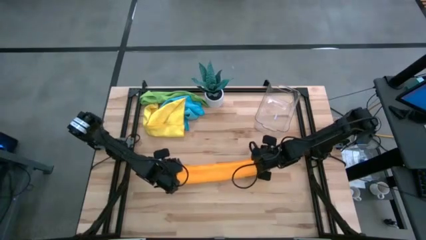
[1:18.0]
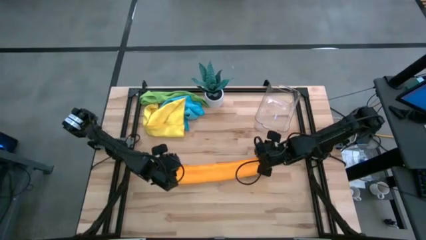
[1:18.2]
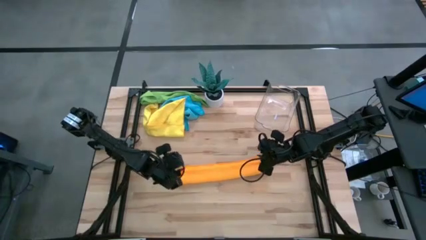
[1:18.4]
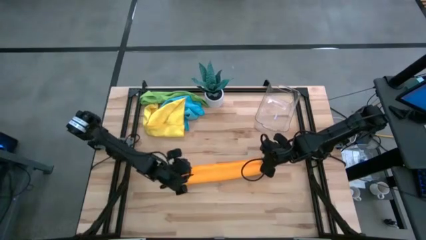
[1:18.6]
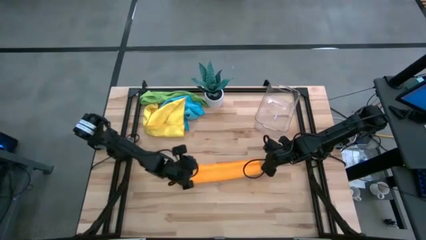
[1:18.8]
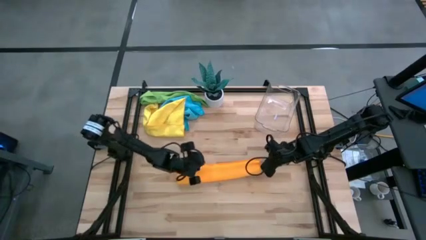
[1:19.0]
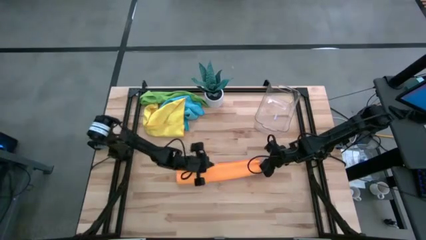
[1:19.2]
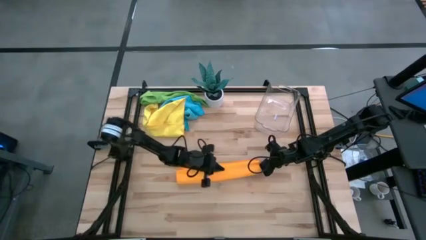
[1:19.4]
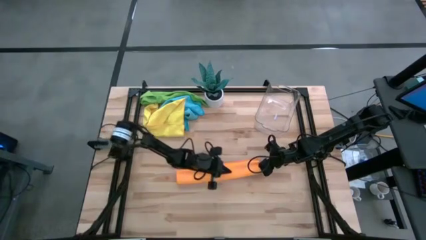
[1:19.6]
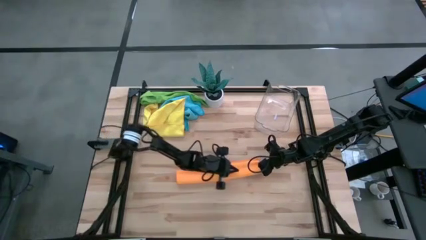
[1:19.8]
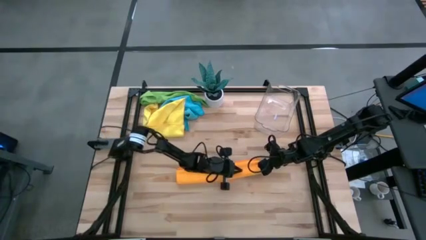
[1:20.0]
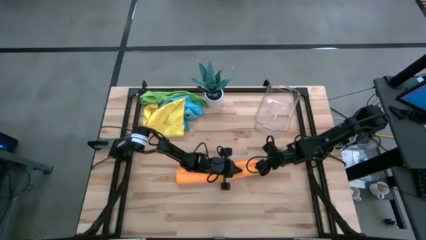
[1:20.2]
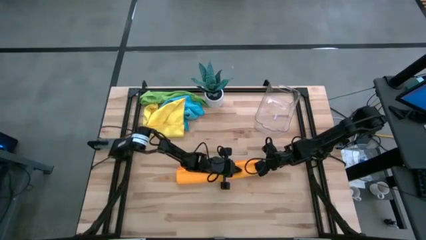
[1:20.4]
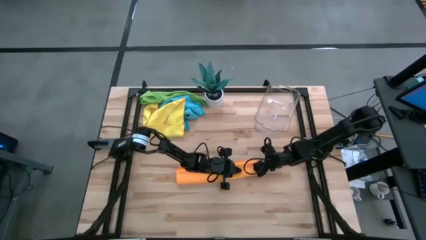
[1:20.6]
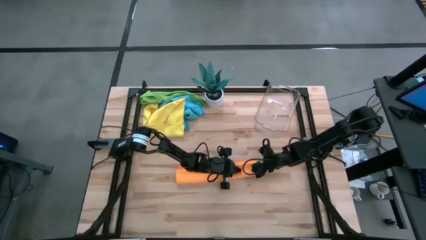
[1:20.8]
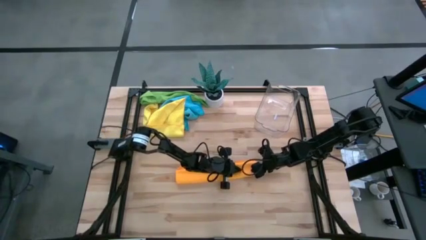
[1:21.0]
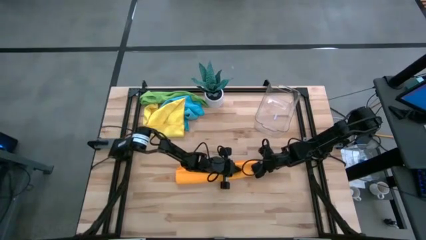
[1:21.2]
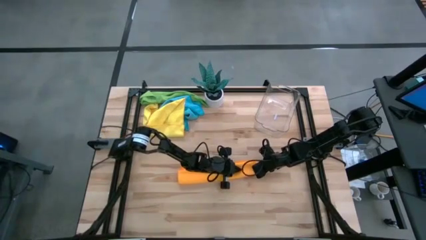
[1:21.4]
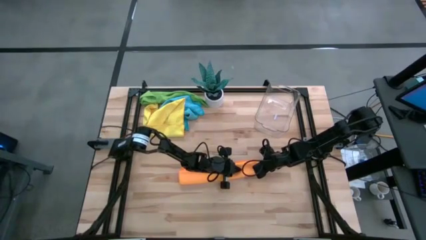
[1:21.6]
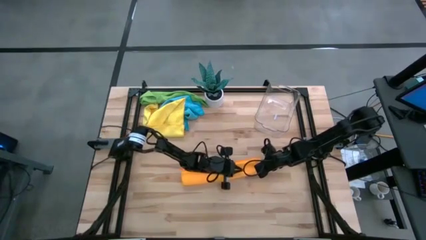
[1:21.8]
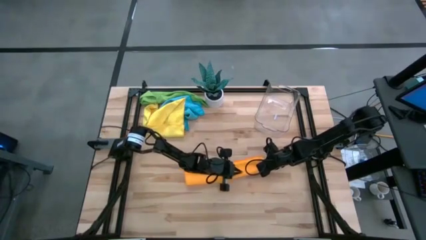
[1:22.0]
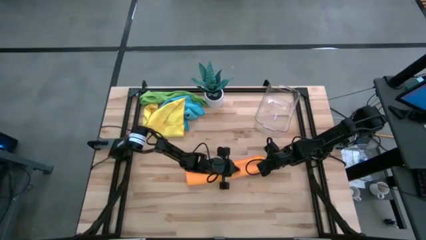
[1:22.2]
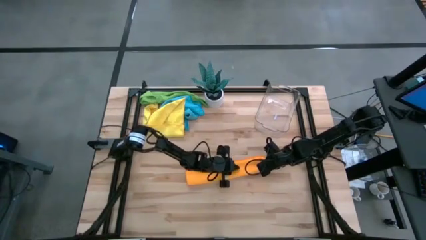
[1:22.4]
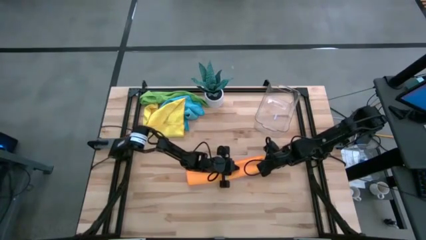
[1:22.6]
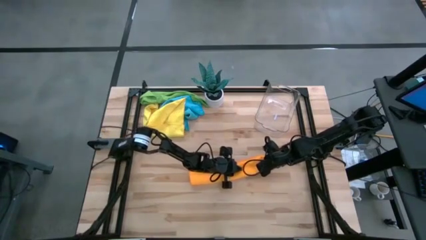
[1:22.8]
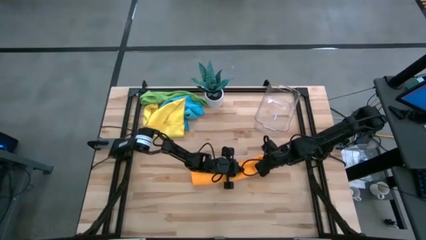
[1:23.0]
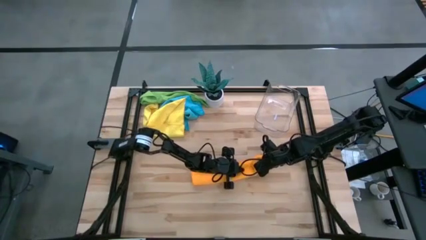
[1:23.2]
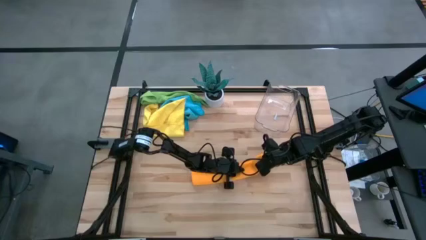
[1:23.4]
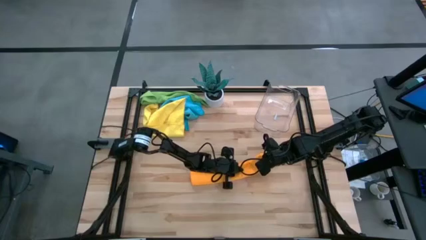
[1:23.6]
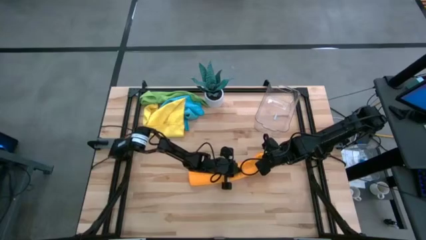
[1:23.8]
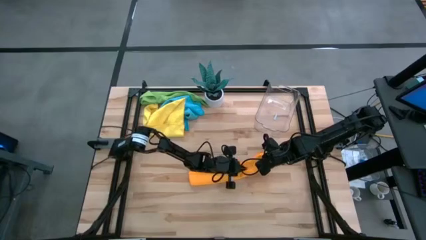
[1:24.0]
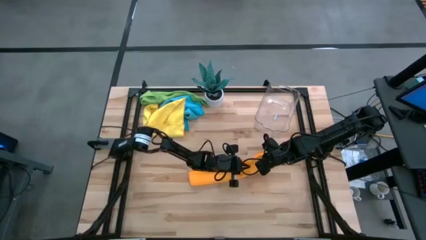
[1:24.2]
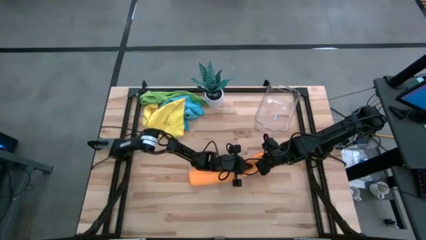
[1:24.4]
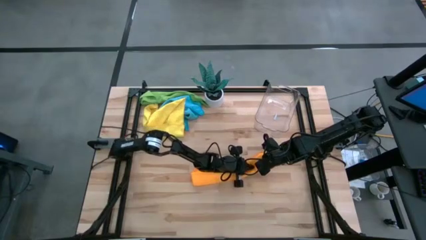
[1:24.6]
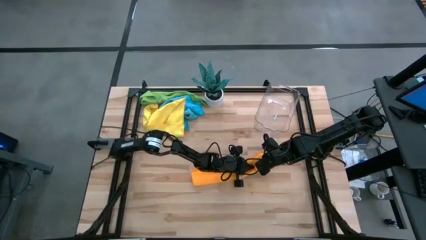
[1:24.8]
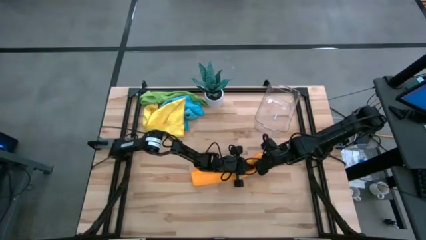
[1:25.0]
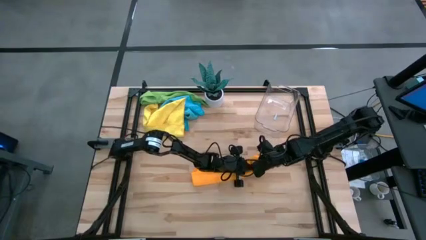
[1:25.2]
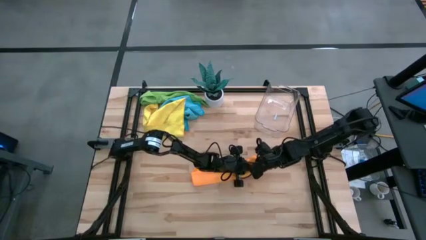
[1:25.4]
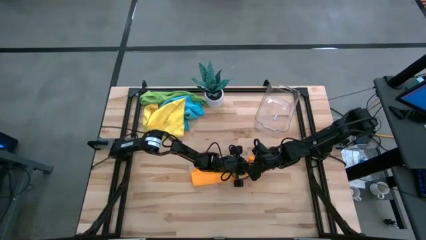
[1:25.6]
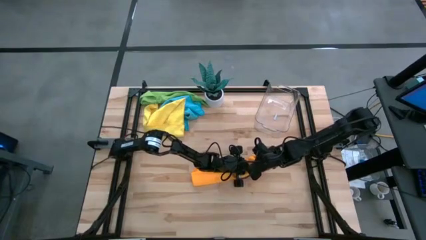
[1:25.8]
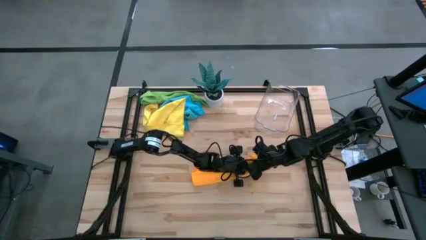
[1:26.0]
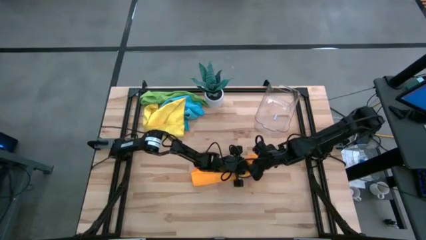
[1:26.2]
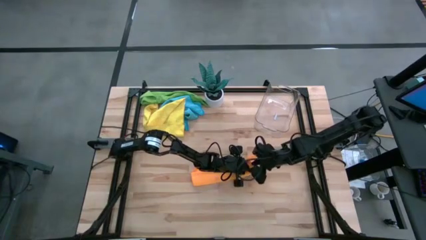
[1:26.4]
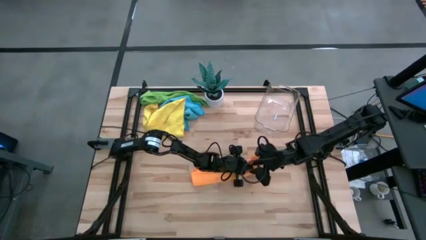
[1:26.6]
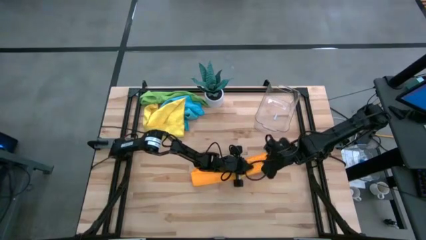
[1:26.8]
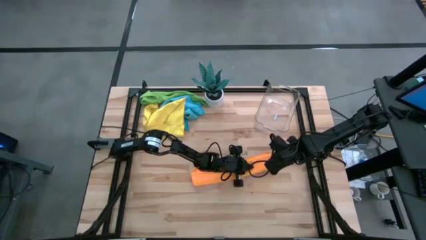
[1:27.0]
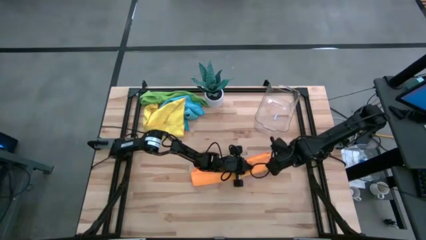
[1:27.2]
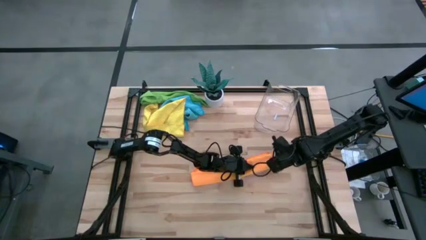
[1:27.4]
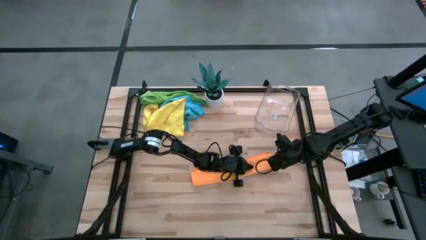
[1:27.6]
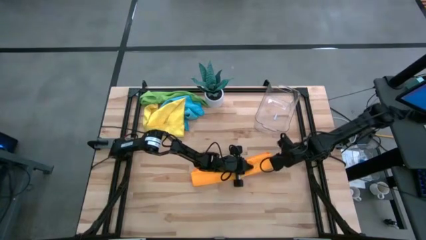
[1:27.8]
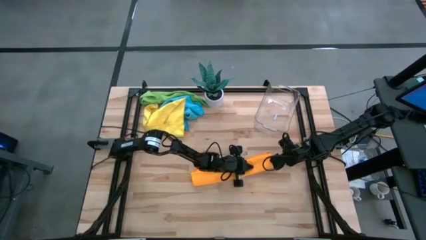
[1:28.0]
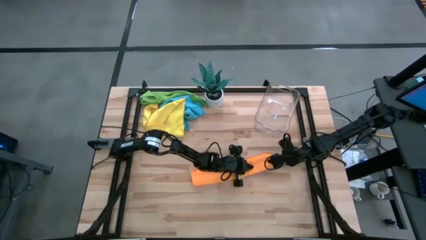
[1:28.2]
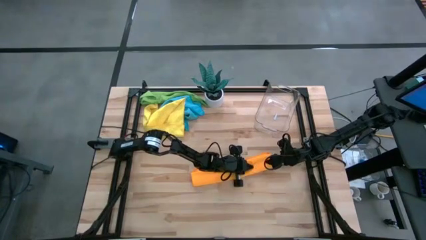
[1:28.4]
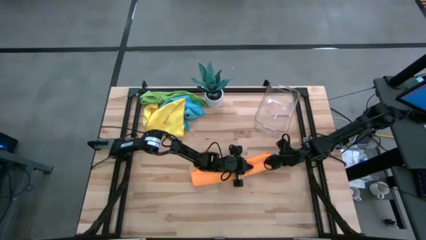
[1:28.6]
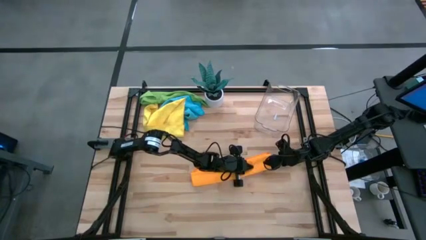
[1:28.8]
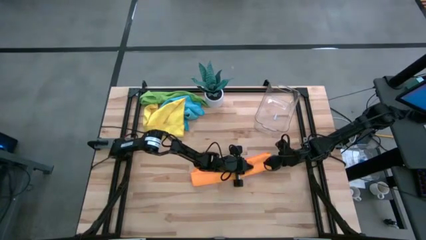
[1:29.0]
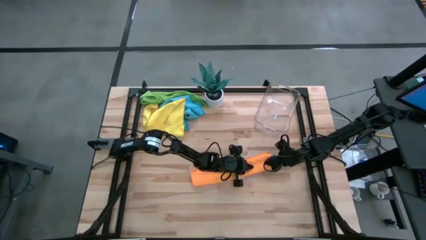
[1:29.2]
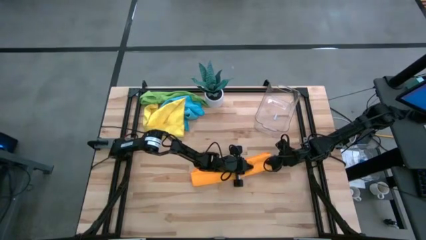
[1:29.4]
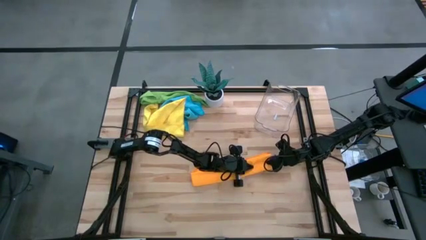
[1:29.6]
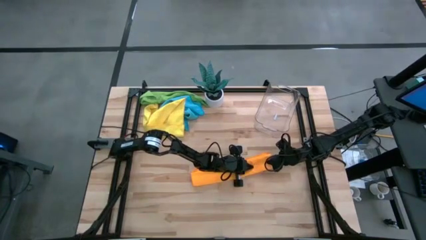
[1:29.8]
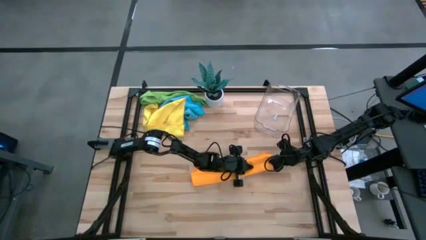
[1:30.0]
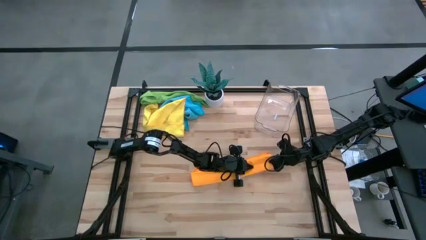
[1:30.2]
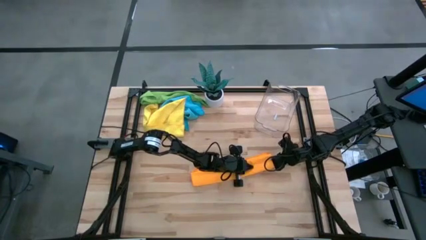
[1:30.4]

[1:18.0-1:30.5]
Task: Roll microfiber towels into tight, uniform cylinder then place into a basket
Roll the orange microfiber cloth

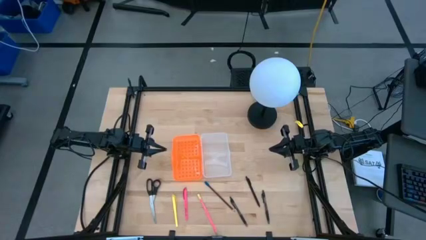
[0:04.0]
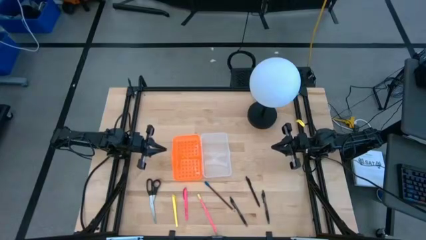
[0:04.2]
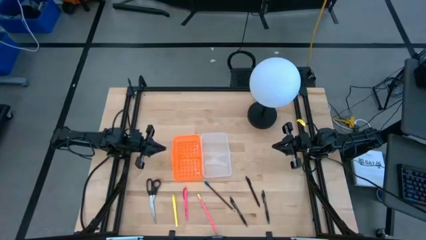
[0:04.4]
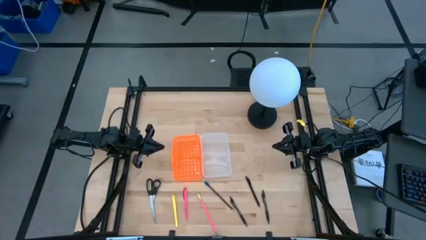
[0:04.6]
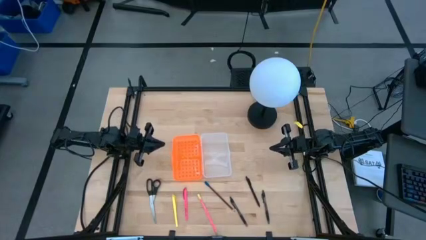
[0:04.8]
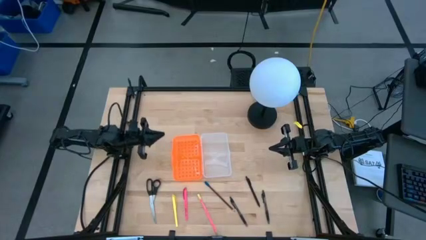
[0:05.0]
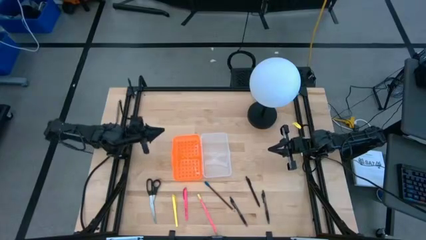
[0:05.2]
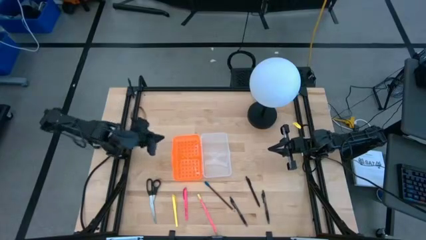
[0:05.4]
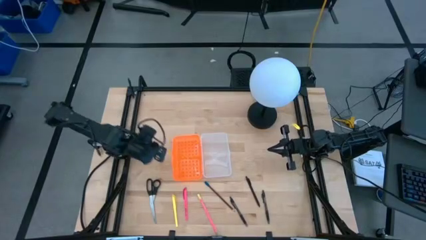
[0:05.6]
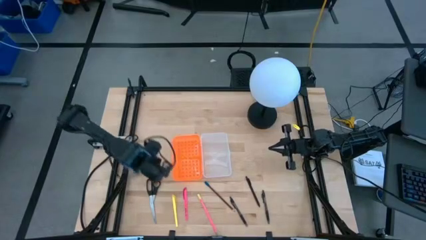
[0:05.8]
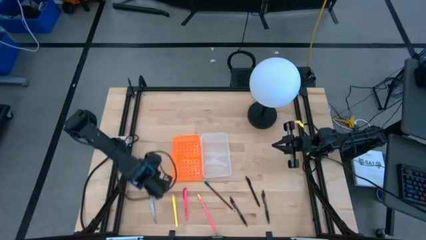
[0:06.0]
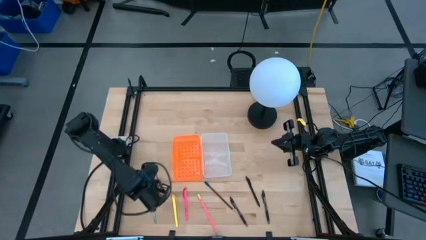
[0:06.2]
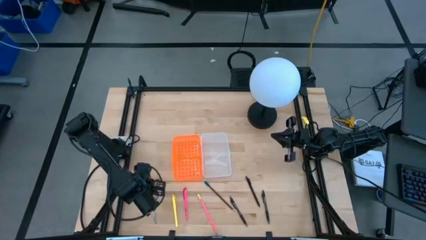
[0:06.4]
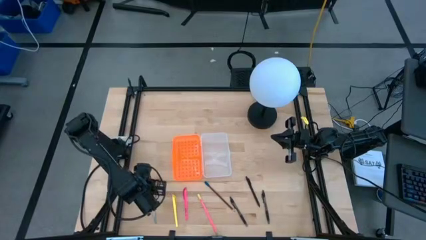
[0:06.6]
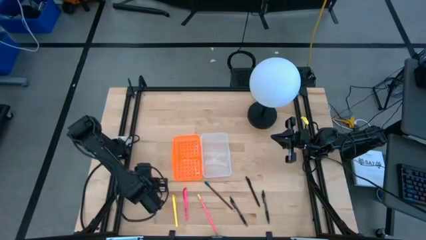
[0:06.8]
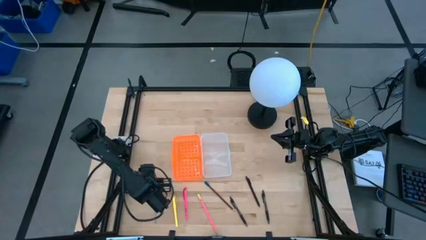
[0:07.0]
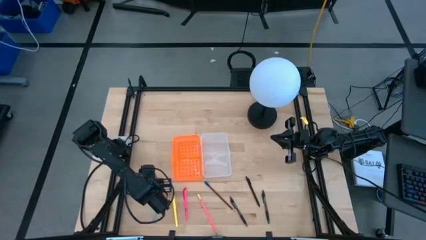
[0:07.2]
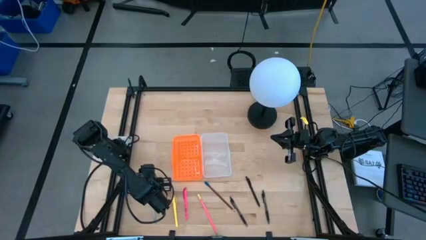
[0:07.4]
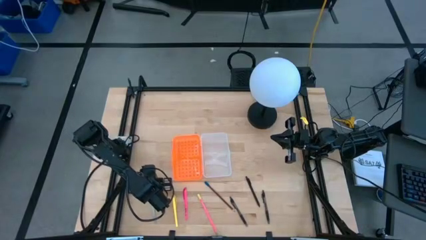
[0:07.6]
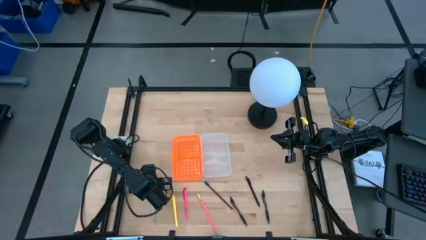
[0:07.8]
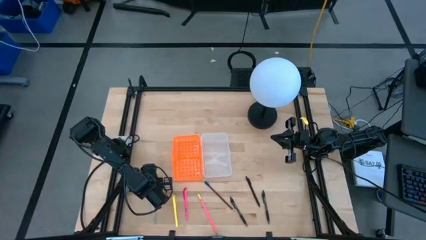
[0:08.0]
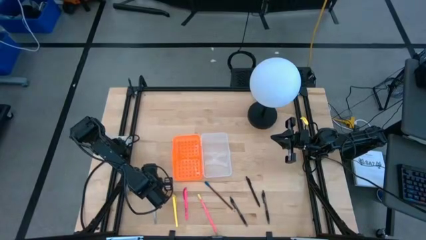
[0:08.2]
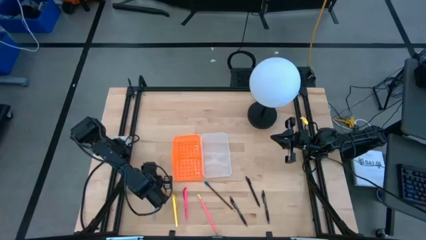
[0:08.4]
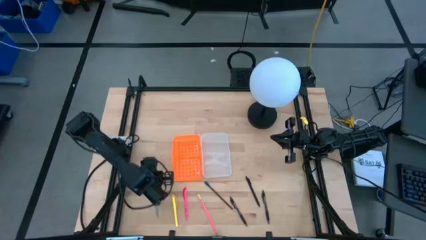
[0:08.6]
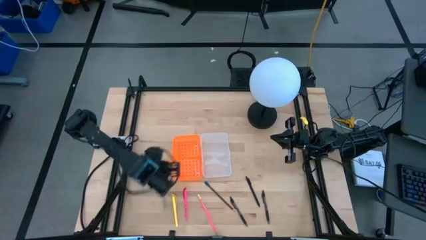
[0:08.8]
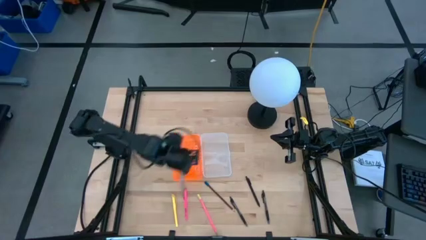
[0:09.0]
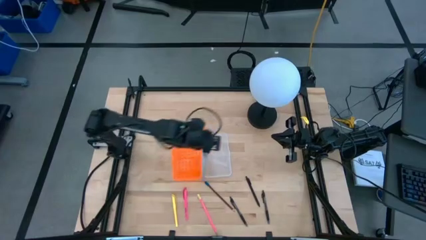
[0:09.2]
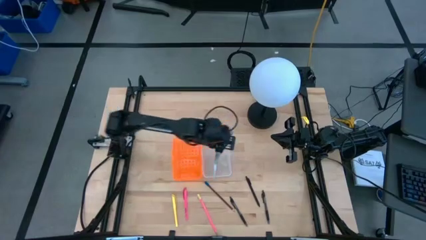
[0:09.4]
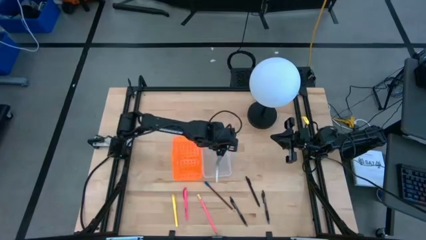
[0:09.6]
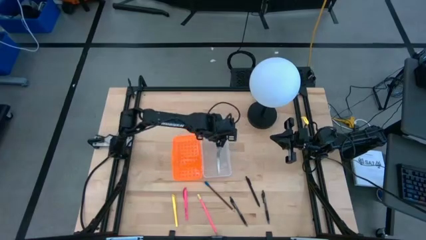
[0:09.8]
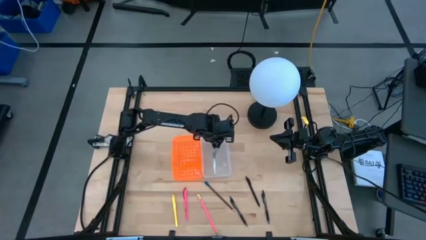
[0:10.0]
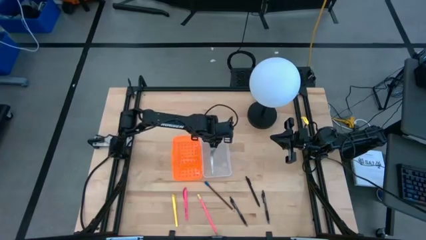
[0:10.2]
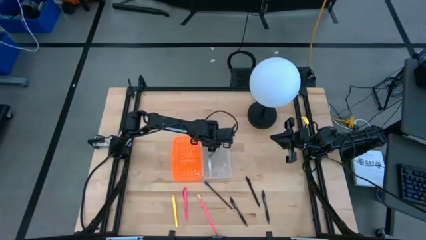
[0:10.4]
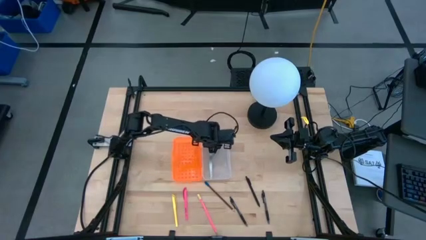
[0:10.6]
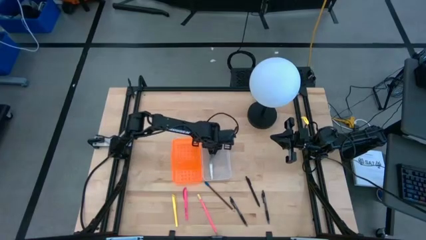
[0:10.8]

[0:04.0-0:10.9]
Task: Pick & place school supplies into a supply box
Put the black scissors into the supply box
